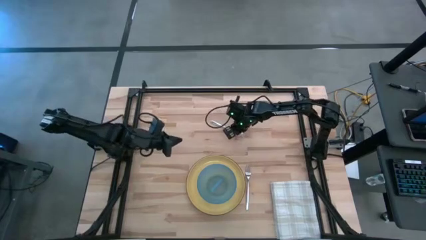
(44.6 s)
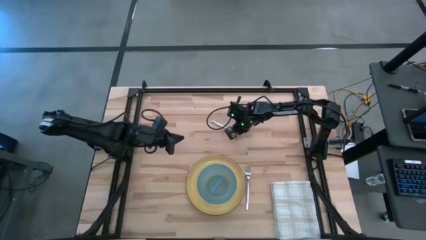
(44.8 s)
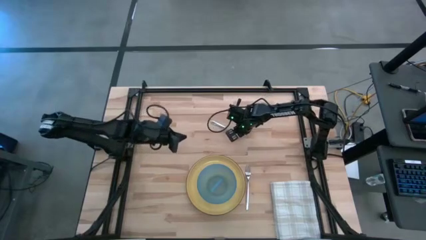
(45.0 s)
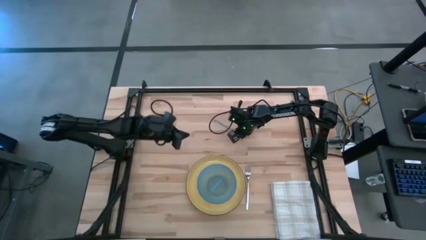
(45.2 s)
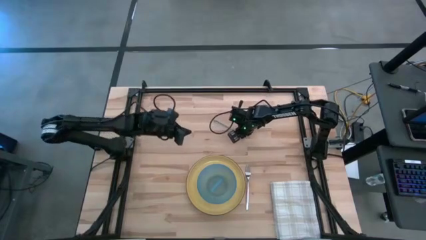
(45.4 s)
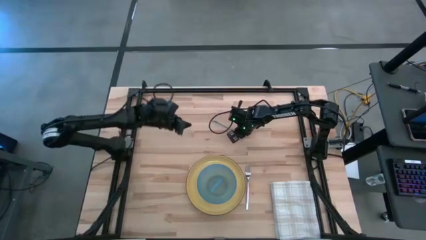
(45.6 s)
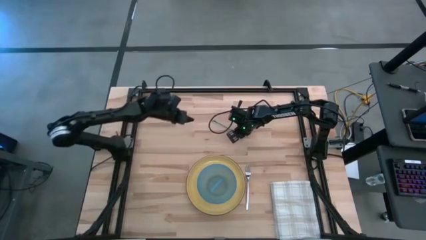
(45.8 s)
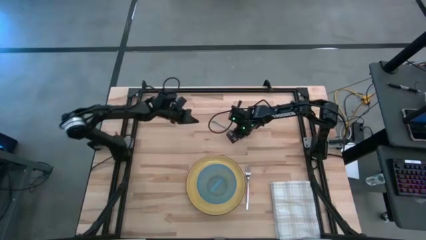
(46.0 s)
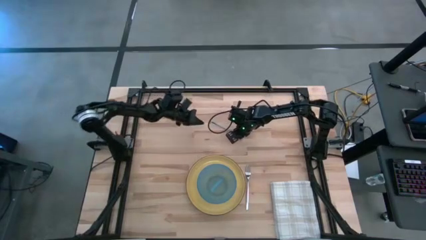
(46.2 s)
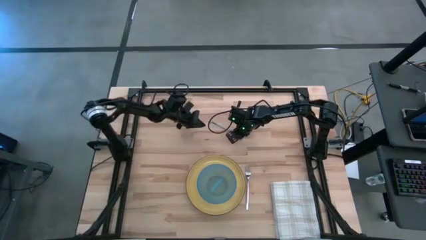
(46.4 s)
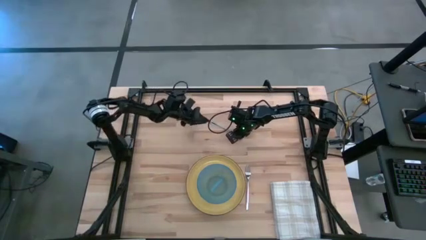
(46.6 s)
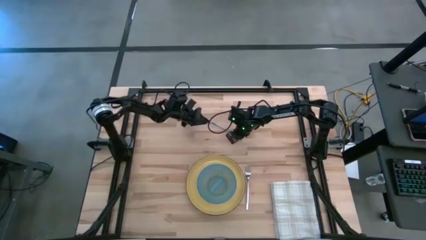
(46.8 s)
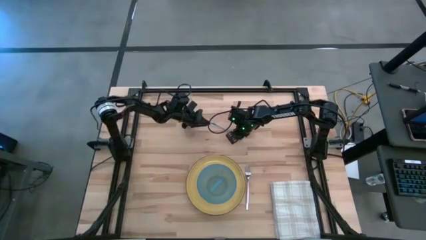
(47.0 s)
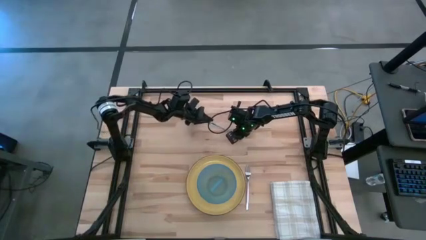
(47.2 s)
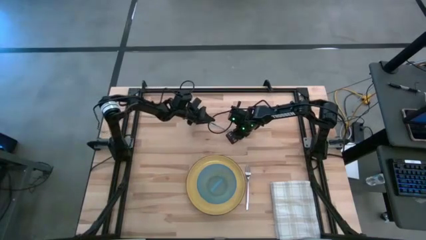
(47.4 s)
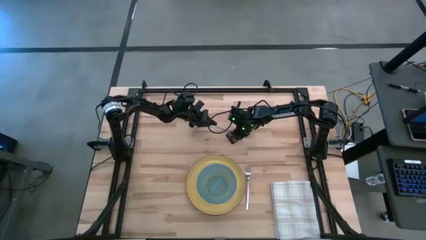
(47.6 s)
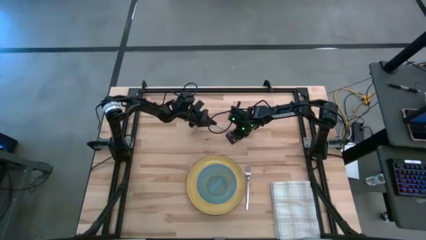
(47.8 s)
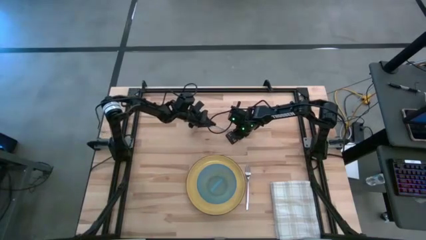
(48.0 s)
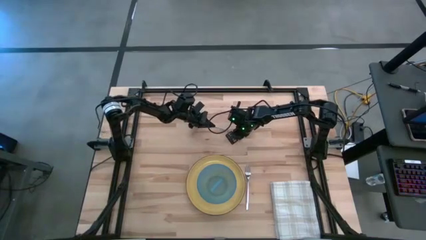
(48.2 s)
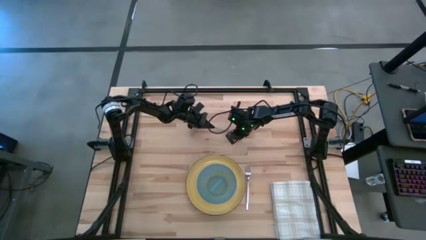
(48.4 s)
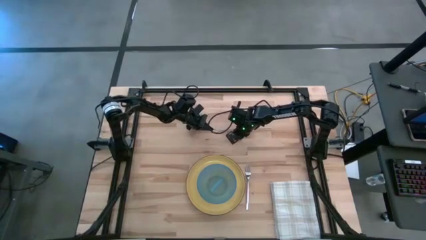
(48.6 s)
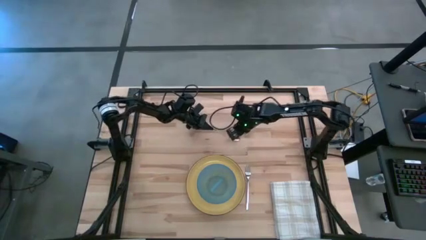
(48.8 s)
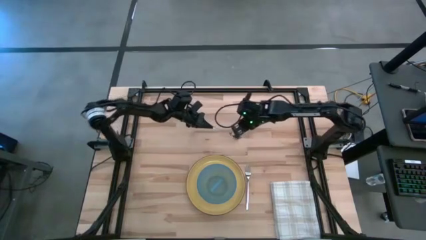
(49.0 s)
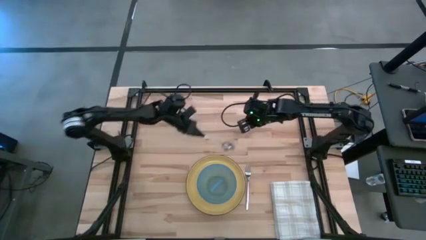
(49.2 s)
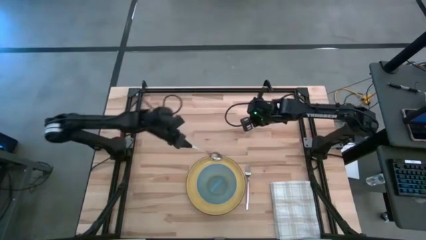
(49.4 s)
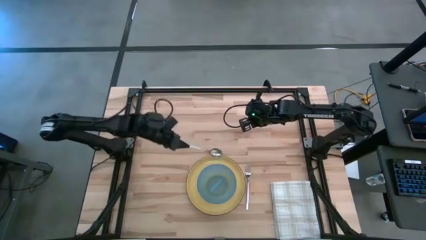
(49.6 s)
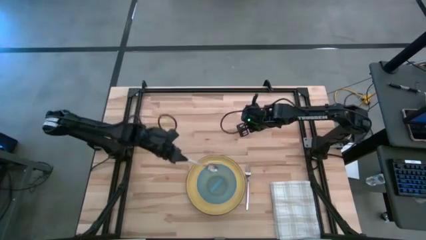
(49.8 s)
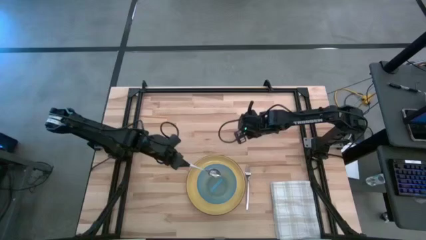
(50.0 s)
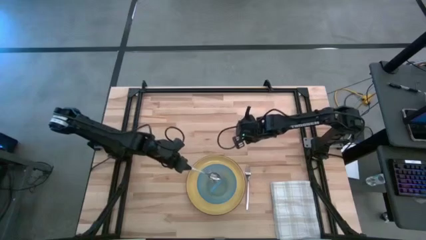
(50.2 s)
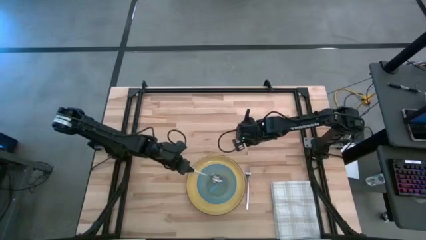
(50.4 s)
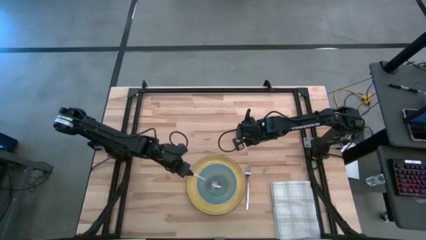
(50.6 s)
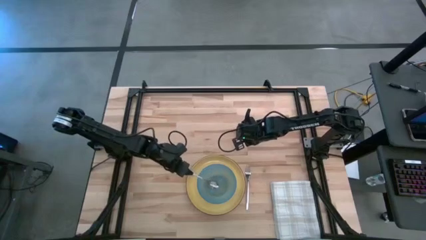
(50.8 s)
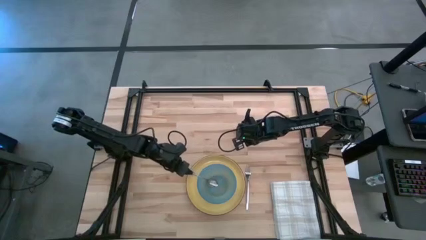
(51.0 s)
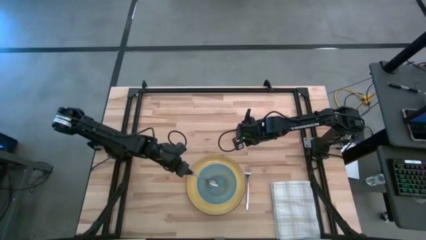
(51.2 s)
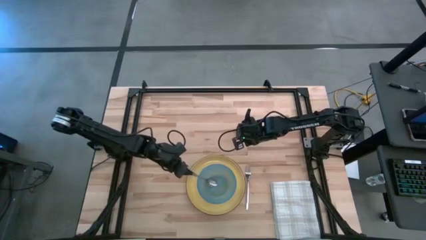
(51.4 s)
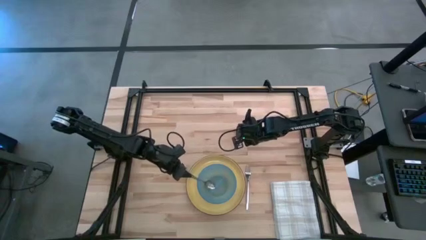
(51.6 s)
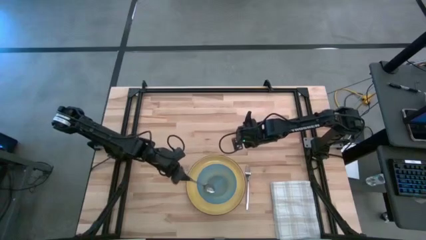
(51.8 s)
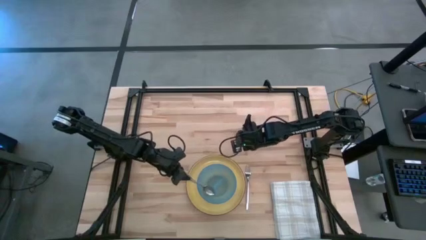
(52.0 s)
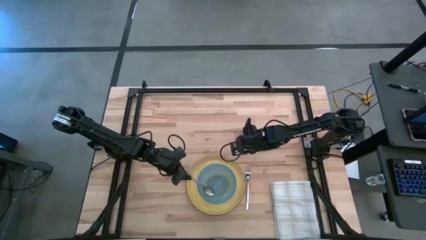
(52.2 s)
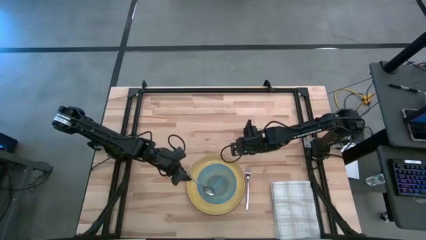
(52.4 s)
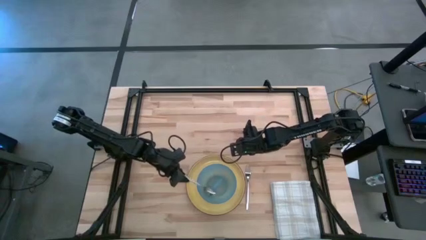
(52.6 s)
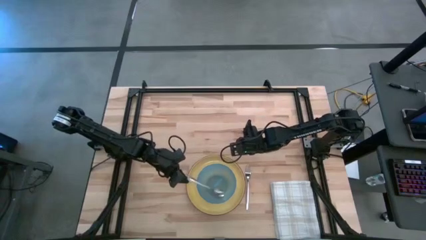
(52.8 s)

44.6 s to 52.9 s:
Task: Set table place
Put the silver spoon into the blue bowl

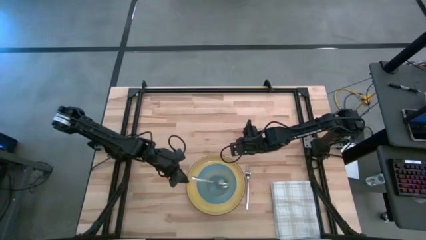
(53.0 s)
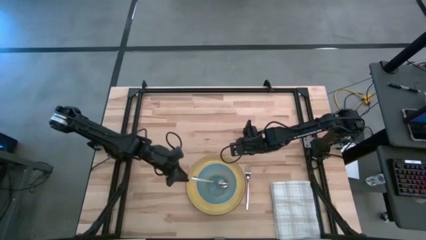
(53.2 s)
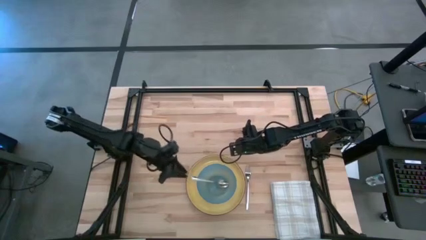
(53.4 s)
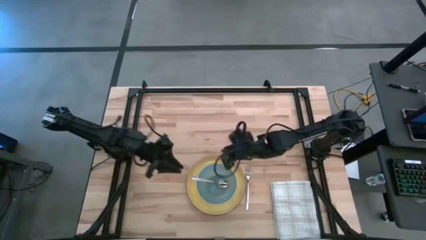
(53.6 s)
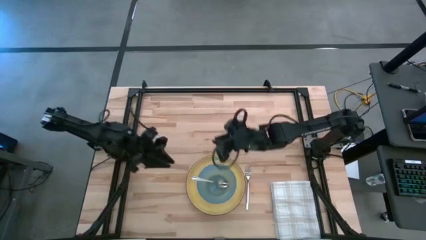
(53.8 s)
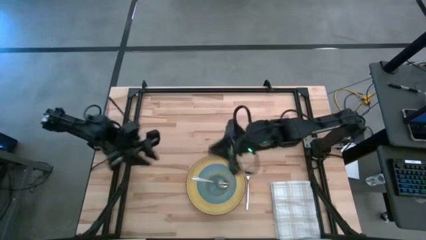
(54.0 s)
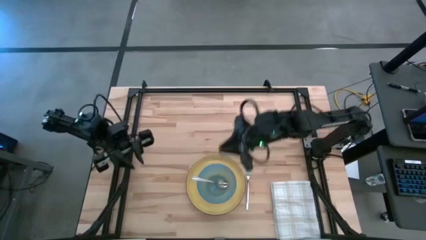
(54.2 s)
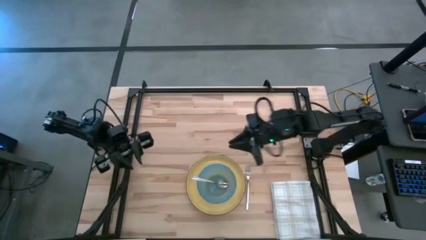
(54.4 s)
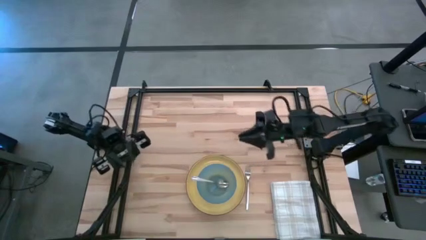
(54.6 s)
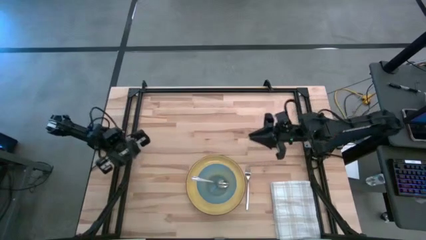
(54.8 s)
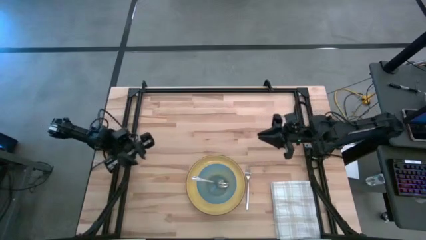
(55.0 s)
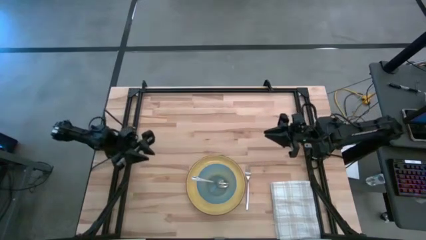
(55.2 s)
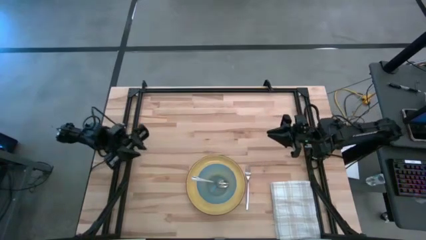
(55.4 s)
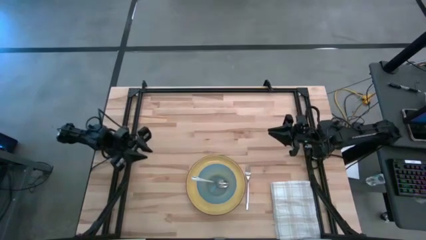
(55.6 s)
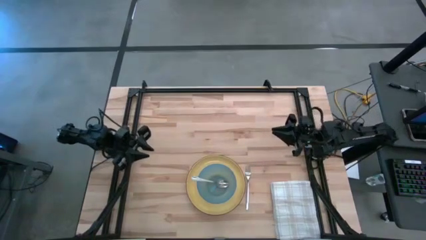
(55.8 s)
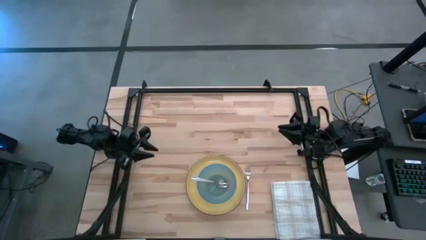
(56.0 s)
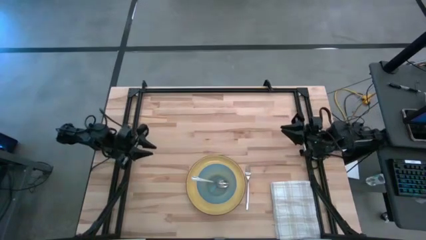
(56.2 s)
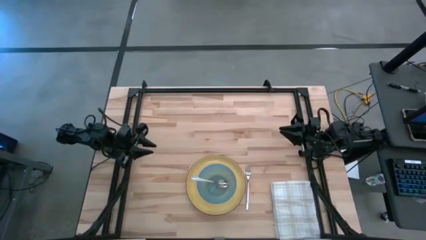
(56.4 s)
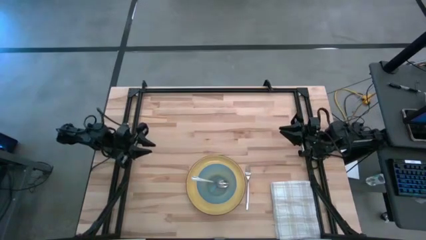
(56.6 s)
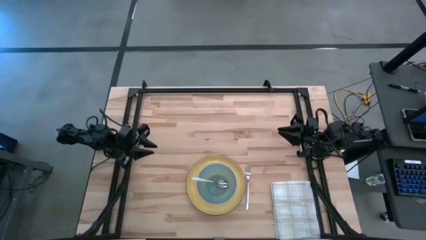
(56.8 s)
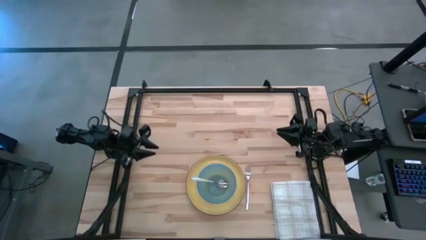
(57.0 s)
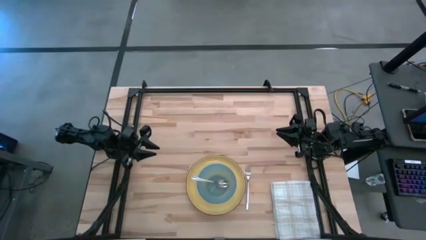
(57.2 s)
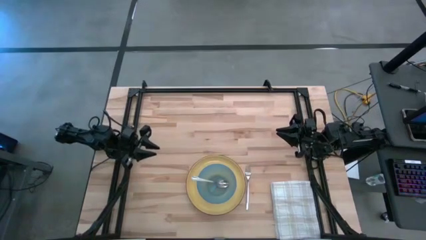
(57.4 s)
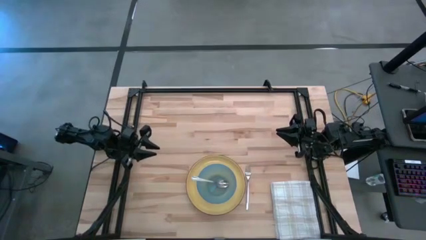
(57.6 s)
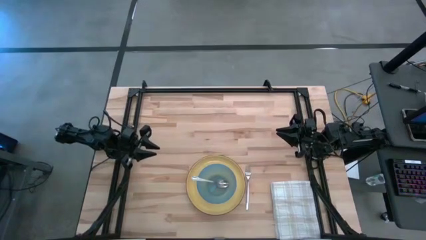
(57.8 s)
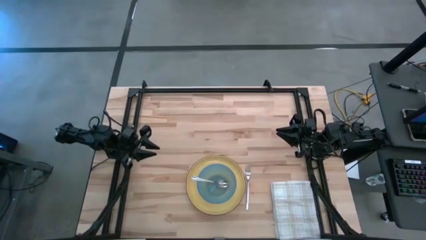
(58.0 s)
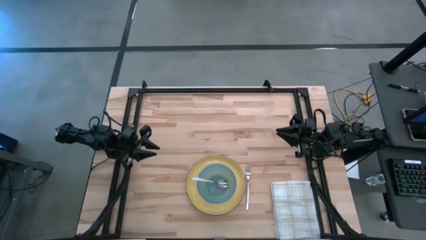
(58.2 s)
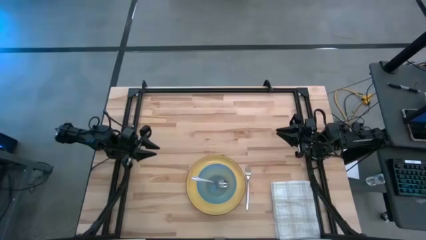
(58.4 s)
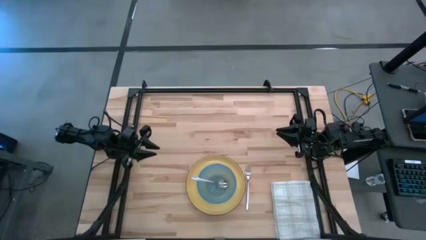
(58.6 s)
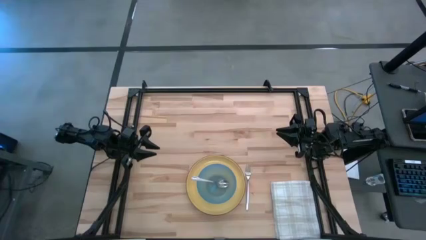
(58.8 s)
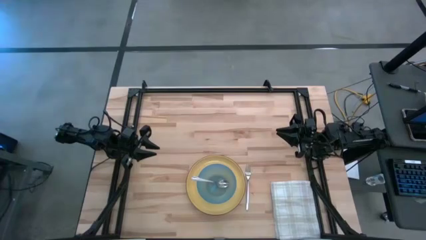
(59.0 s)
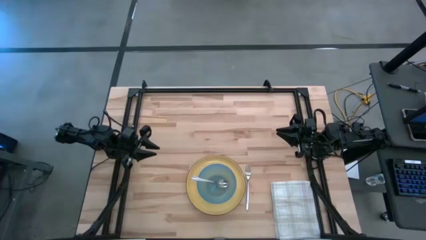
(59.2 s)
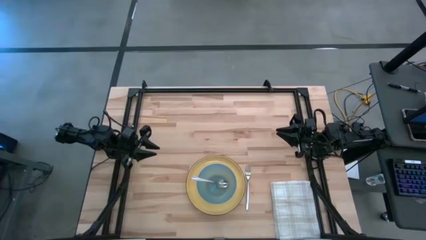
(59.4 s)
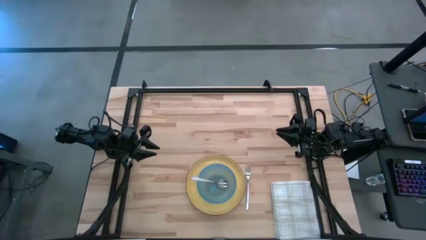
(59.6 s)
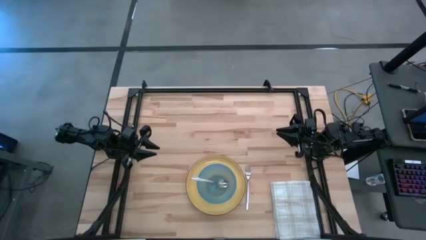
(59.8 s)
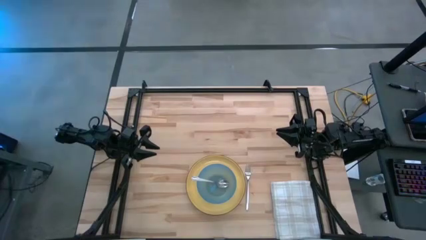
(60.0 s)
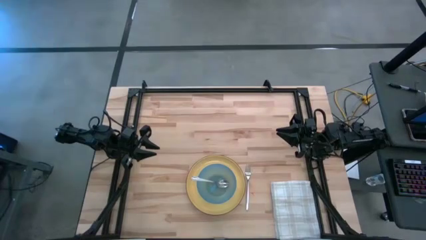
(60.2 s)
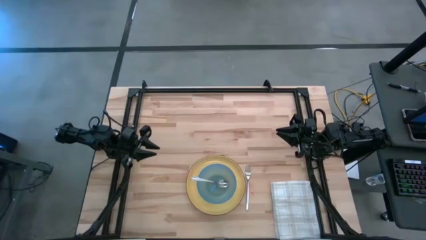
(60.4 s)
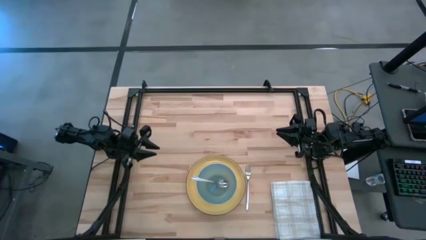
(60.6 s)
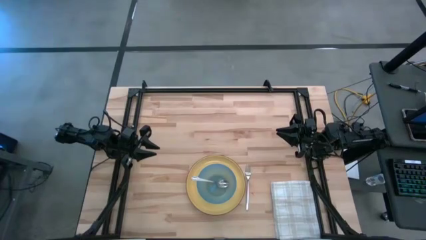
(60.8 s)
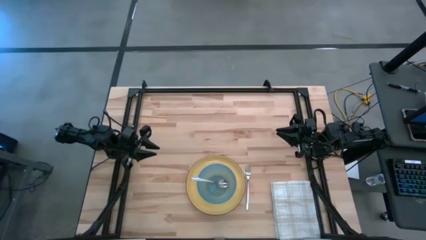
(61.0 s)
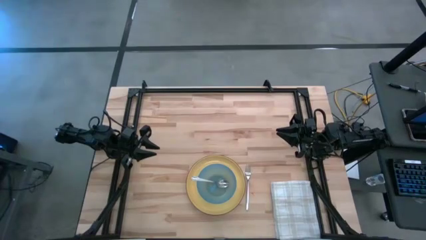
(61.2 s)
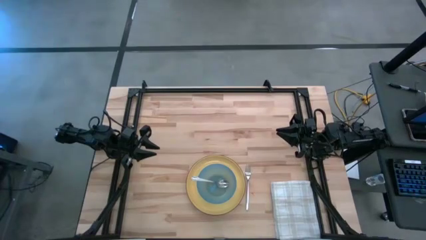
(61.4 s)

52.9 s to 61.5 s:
Return to Home Position
